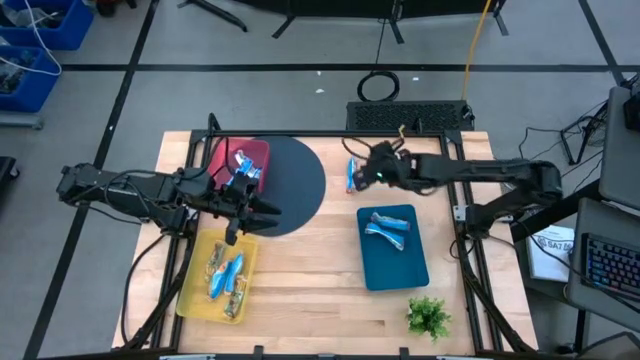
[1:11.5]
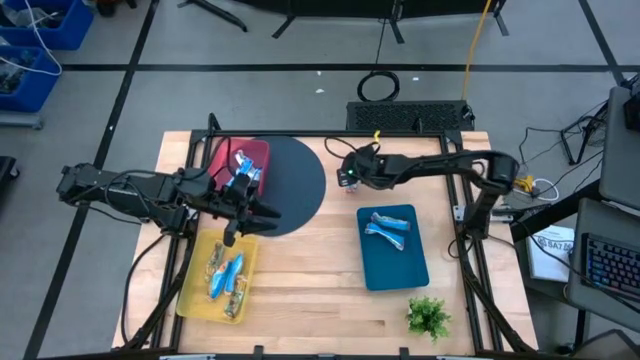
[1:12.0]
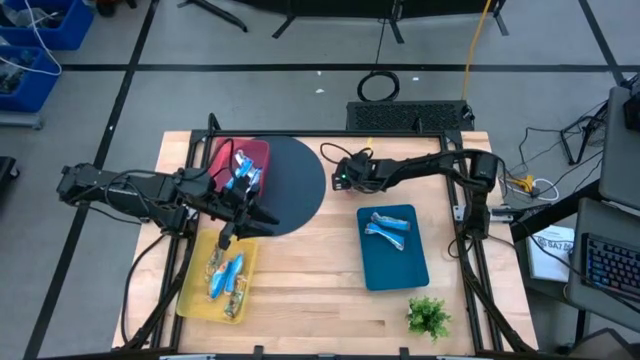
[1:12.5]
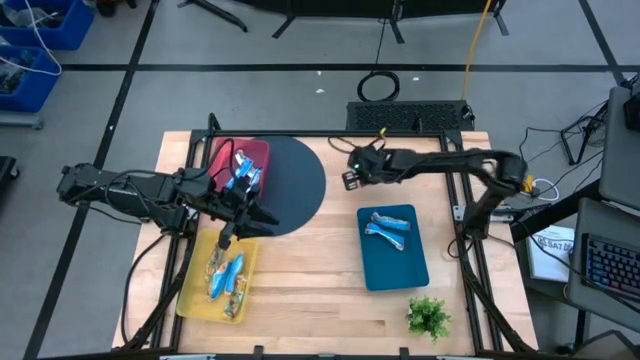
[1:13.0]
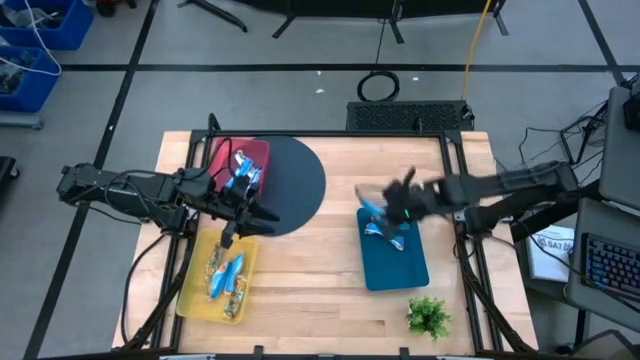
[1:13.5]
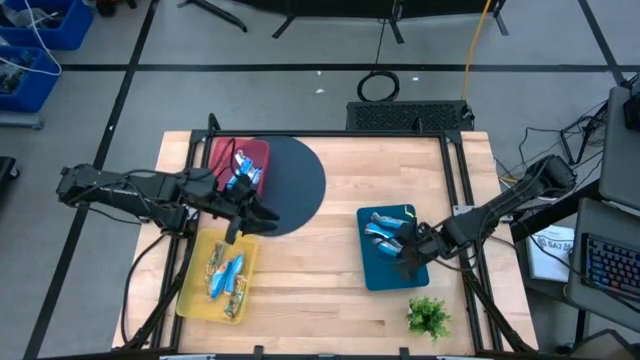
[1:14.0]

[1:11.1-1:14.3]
Task: Pick and place Granola Bars by type
Put the red granola bar into the blue bin

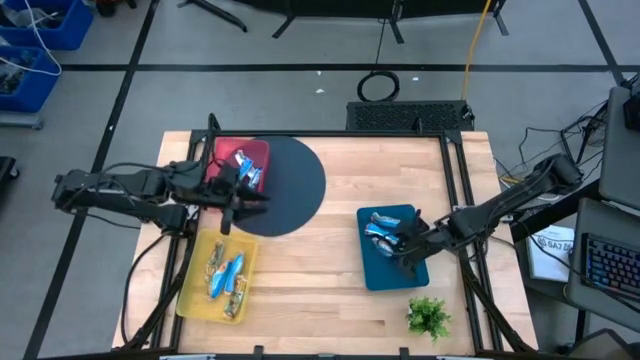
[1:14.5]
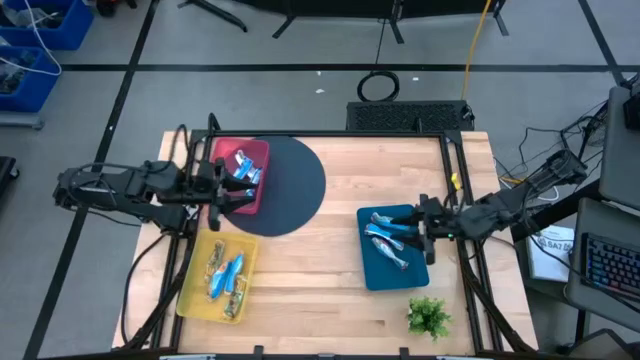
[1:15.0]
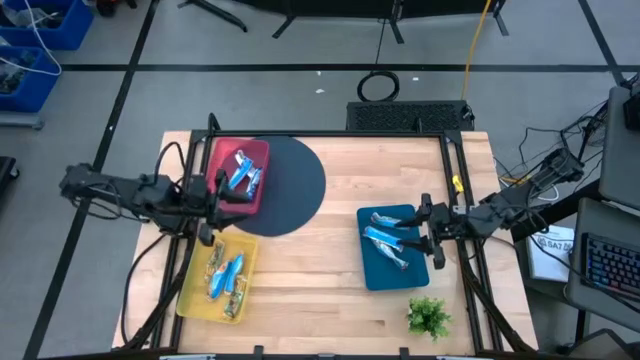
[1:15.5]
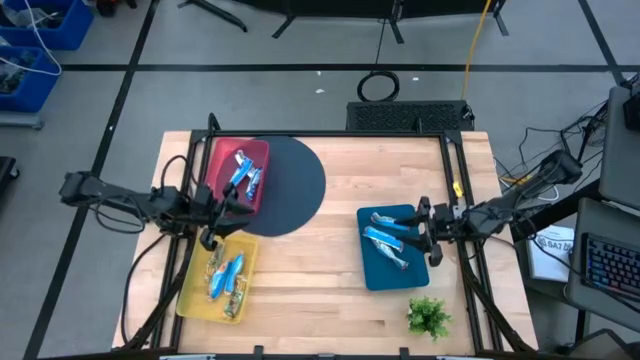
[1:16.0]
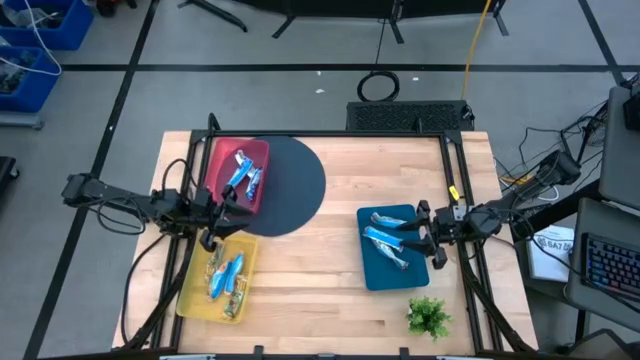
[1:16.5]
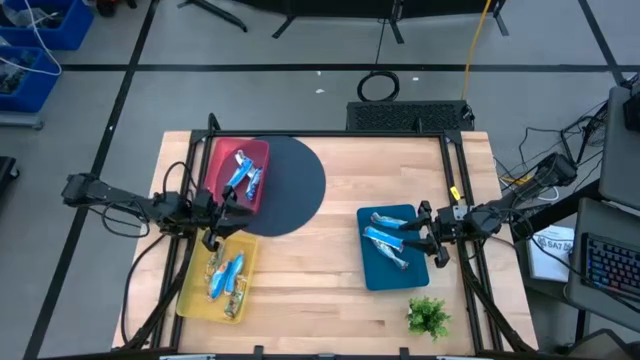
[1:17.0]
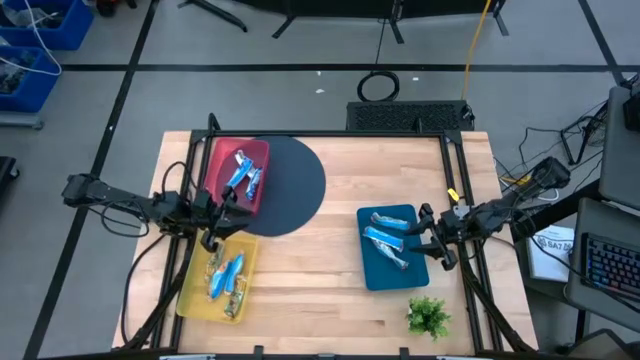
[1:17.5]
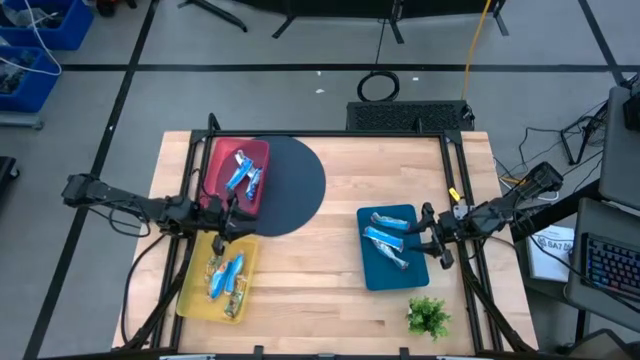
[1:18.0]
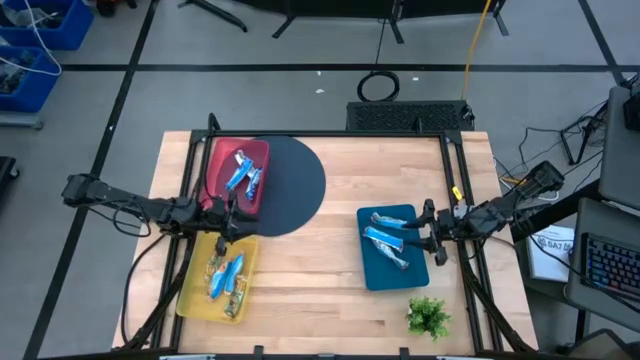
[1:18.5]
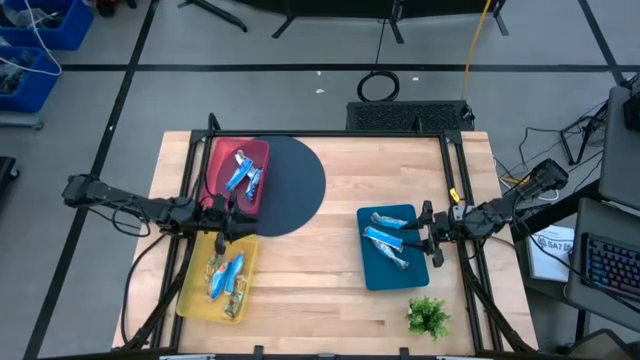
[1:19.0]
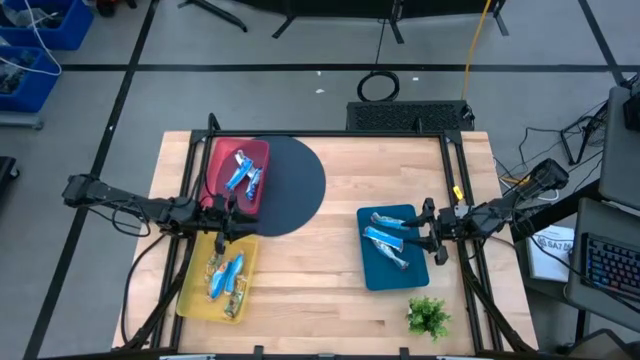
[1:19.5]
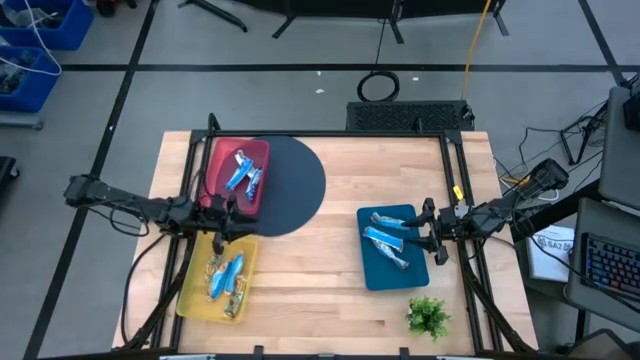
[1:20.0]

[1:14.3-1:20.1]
Return to Home Position

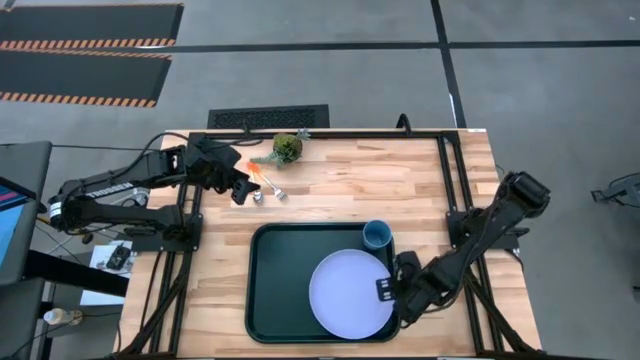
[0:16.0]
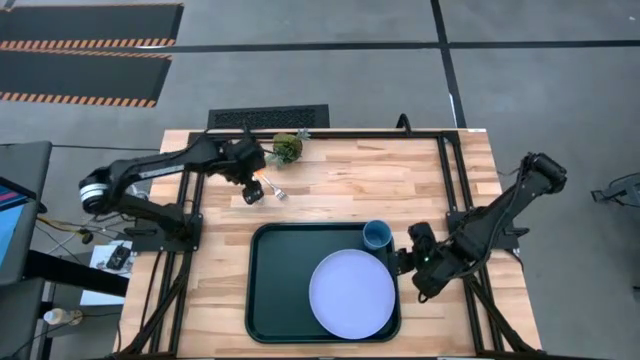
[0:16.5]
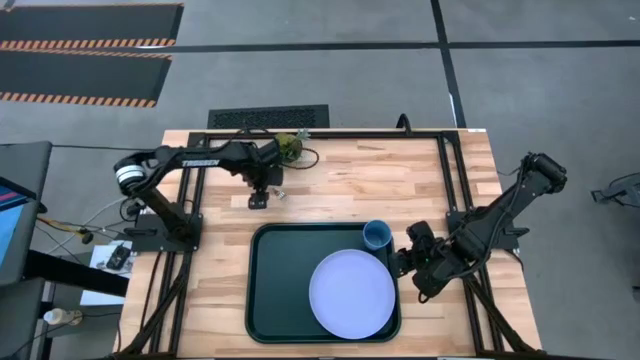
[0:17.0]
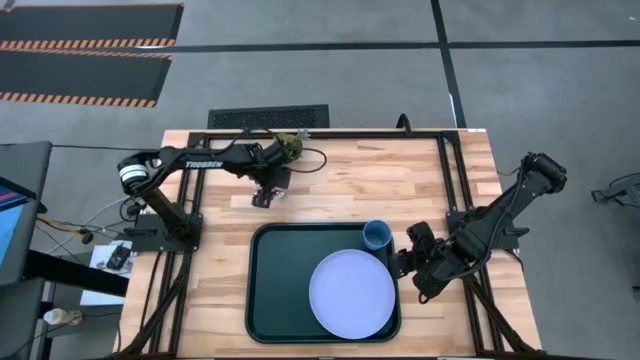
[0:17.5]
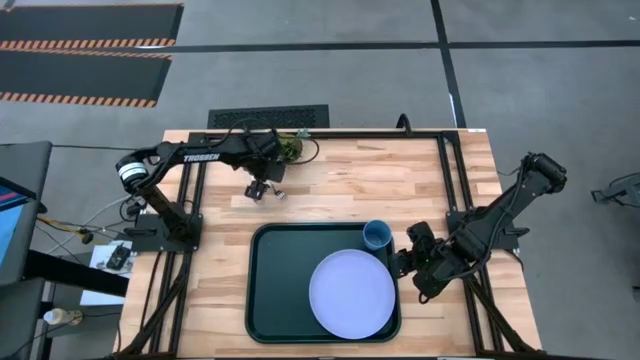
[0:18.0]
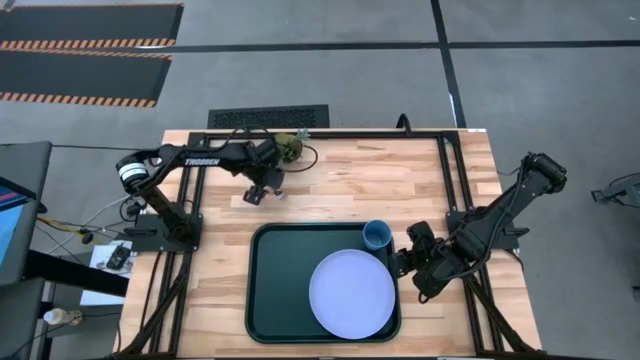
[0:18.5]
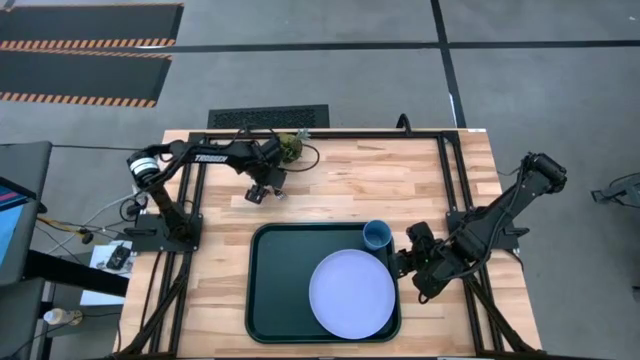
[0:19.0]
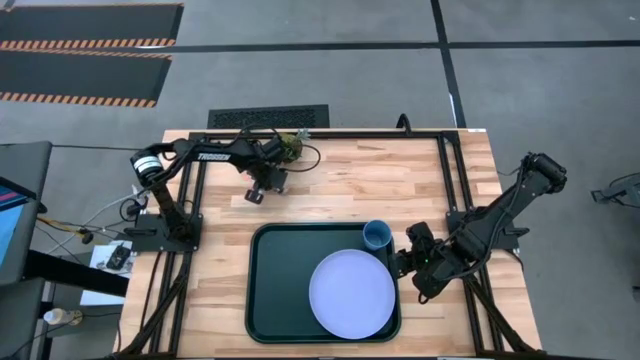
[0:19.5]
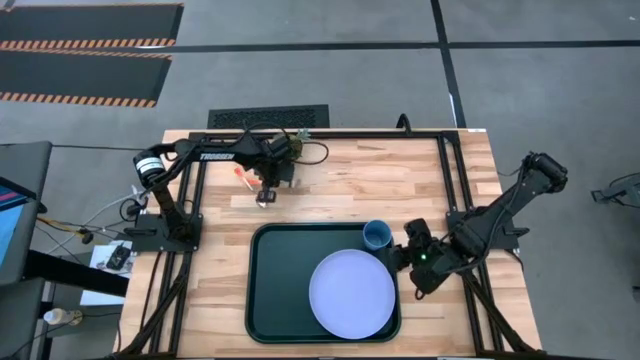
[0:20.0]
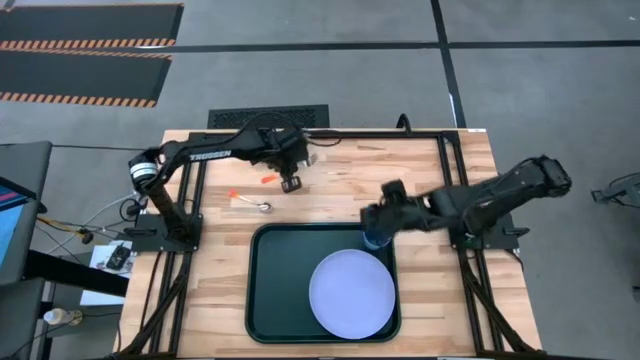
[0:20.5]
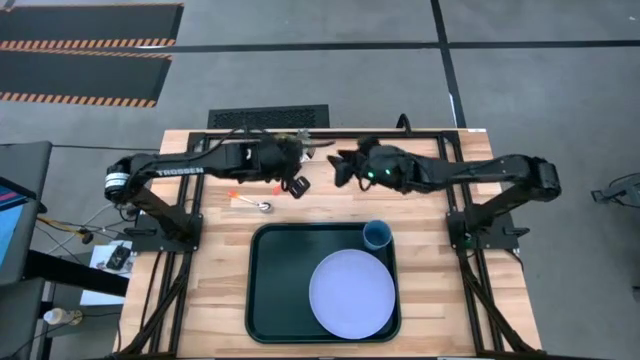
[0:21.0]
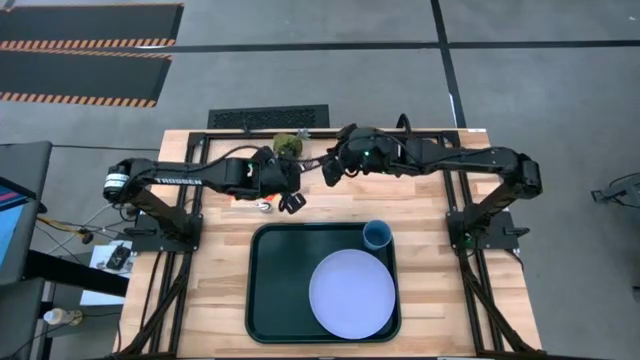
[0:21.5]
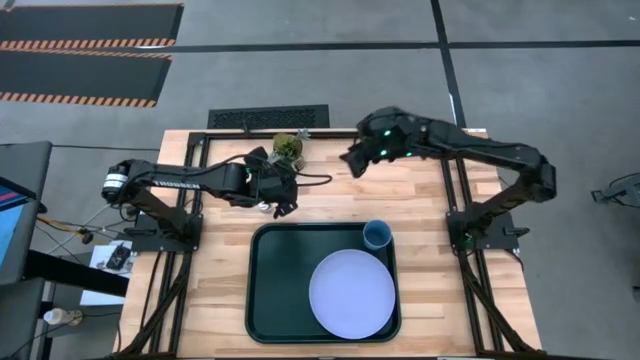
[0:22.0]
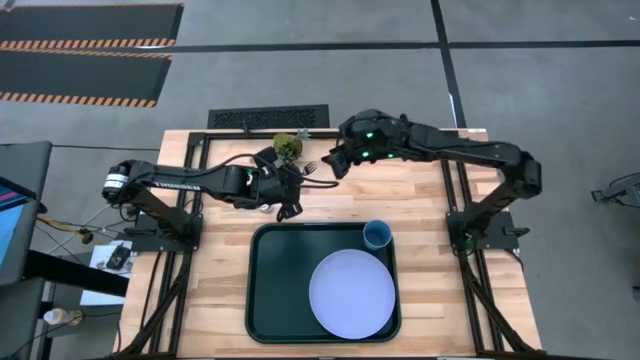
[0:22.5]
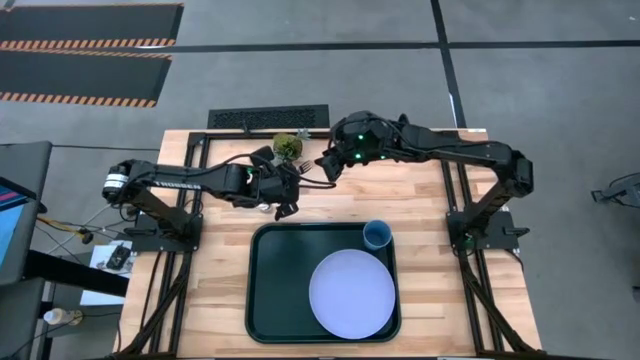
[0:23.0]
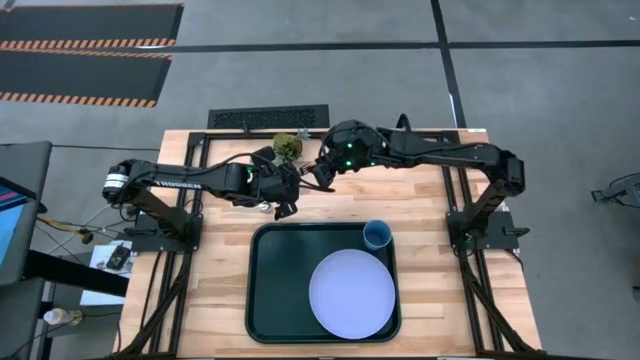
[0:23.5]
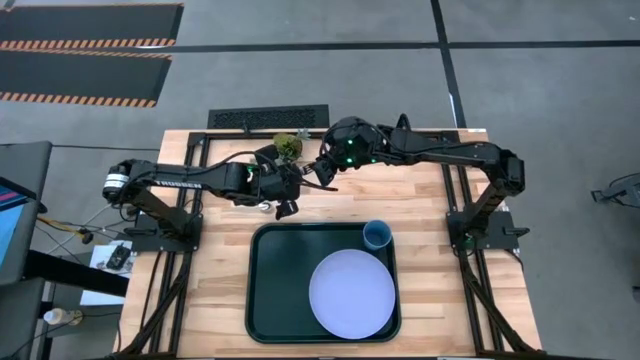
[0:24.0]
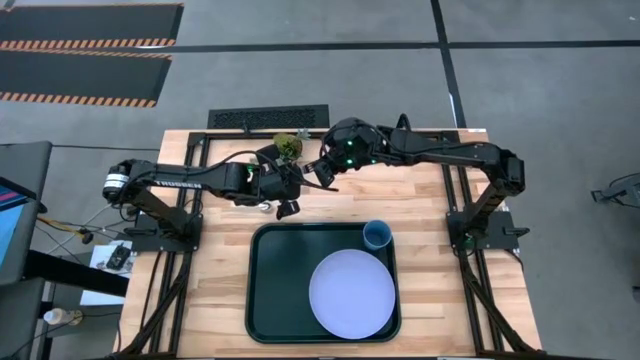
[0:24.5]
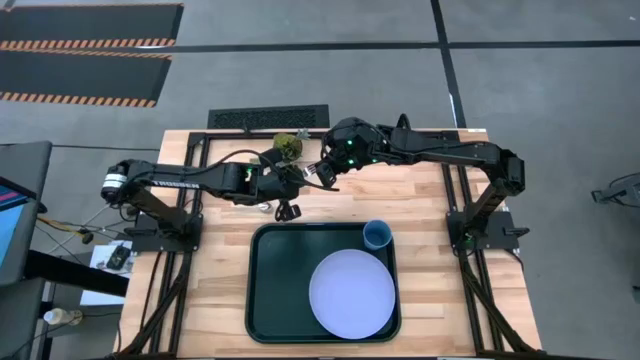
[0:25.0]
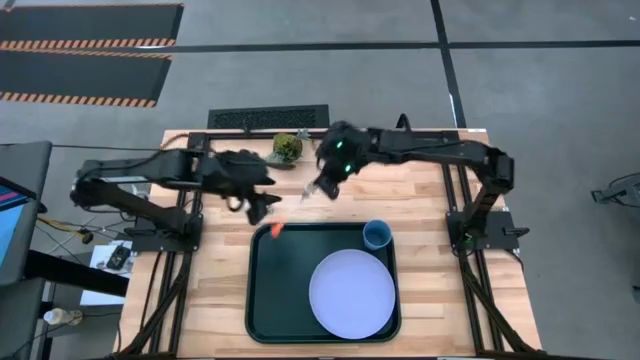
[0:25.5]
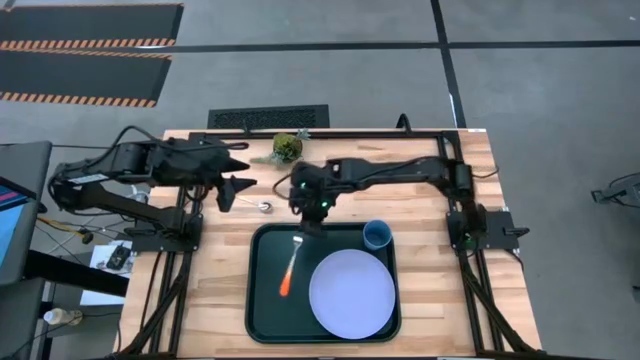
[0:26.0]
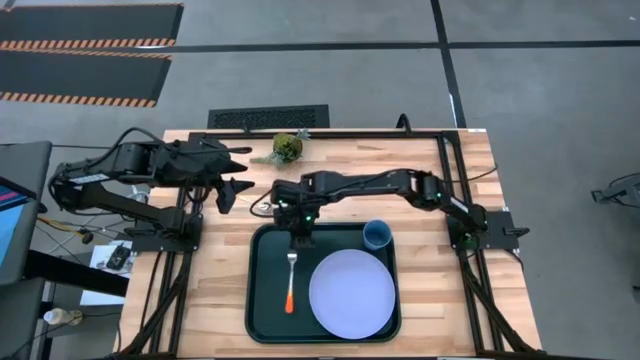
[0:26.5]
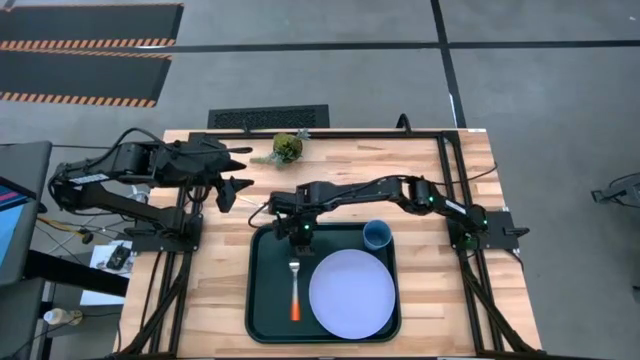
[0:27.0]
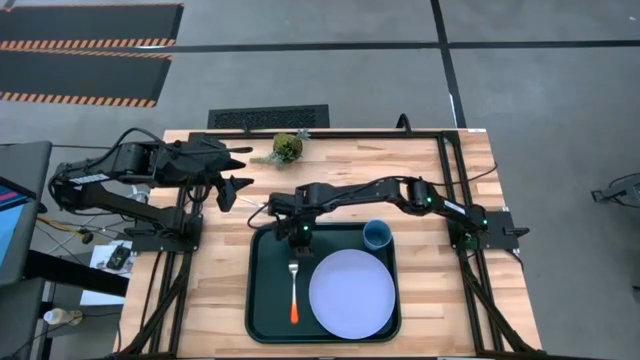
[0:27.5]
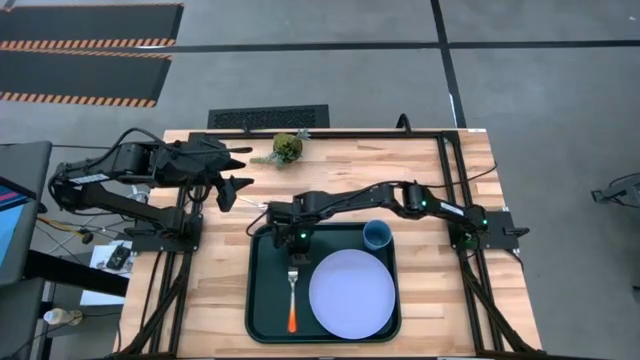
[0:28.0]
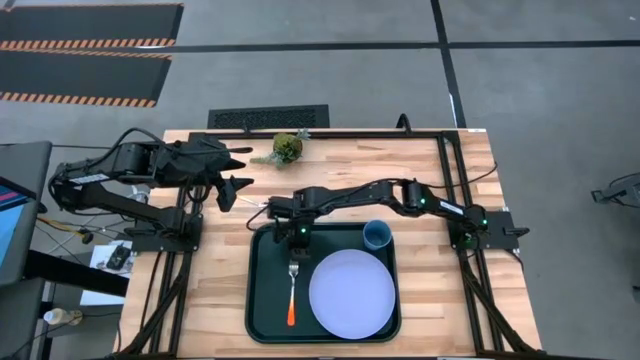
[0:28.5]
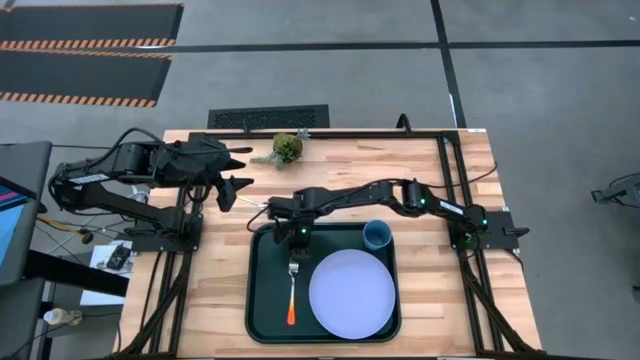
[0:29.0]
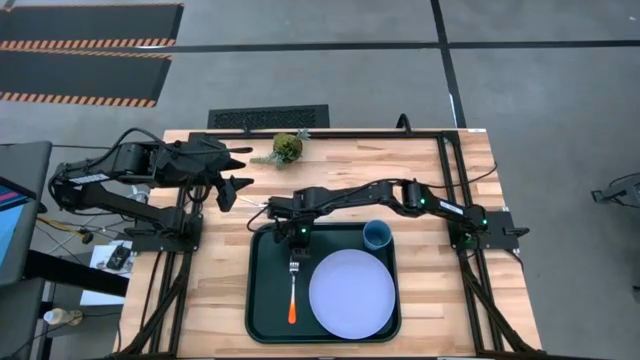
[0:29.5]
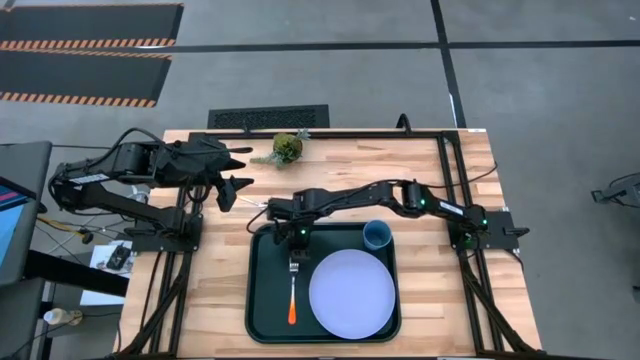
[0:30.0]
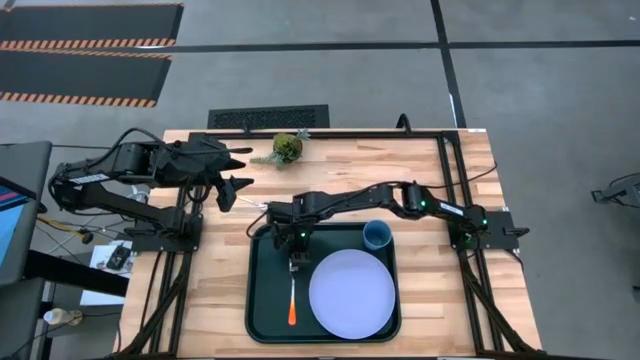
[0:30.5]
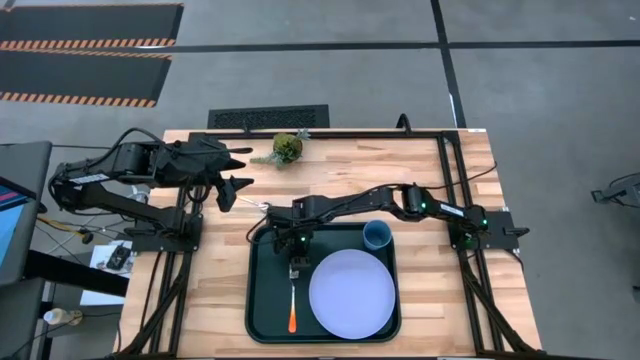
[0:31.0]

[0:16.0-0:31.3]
Task: Pick and place plate/cup/fork/spoon on tray
Put the orange fork on the black tray to the left of the violet plate
